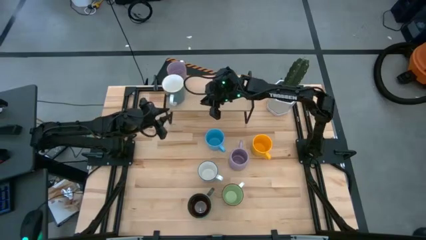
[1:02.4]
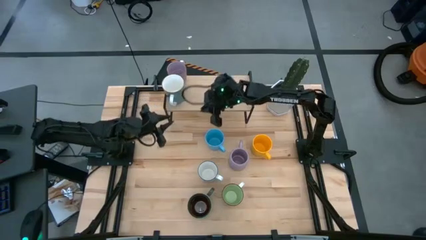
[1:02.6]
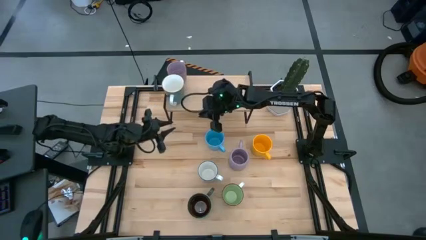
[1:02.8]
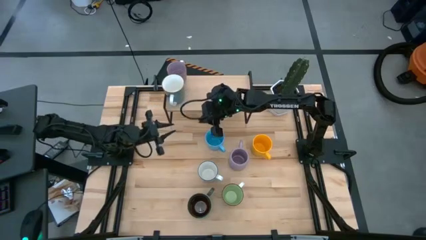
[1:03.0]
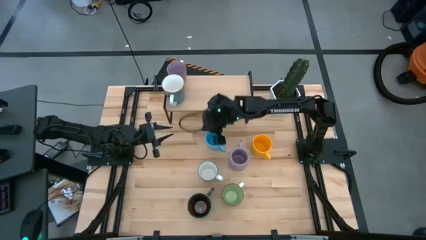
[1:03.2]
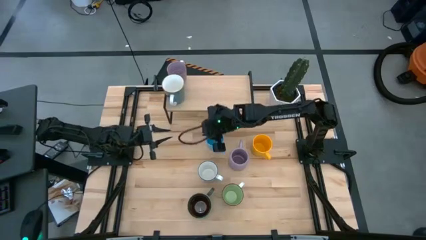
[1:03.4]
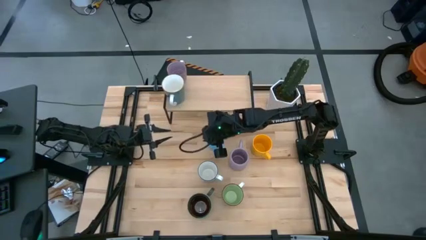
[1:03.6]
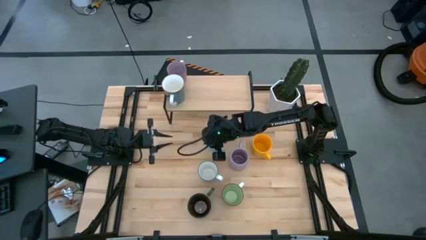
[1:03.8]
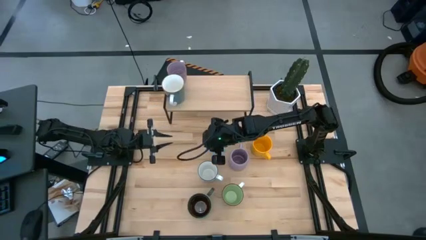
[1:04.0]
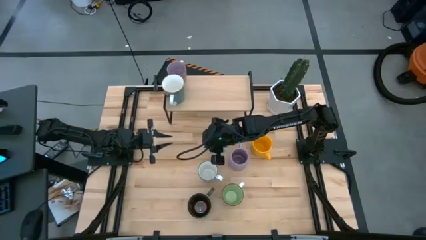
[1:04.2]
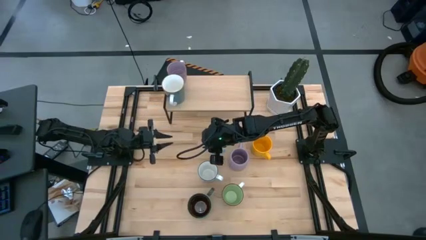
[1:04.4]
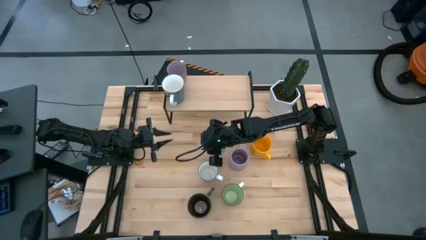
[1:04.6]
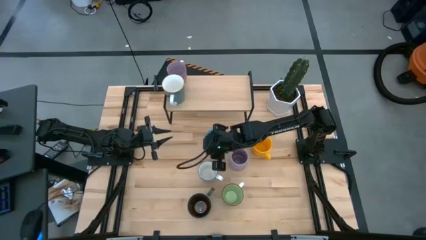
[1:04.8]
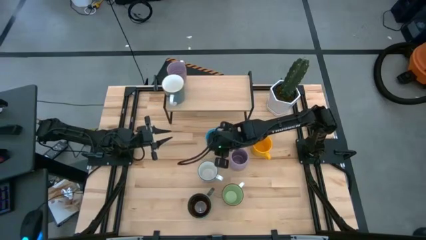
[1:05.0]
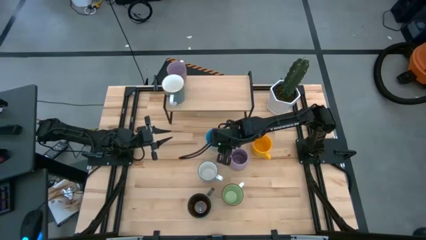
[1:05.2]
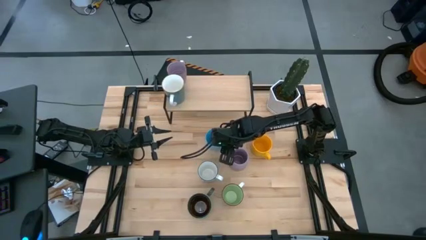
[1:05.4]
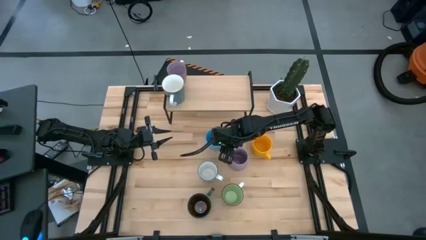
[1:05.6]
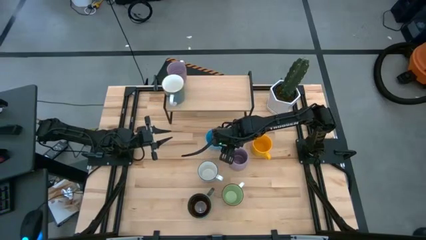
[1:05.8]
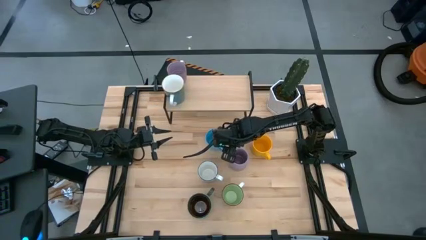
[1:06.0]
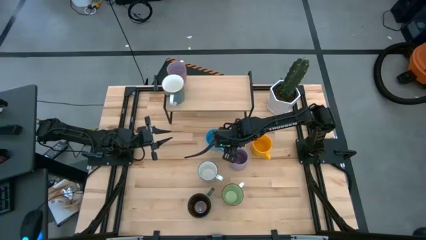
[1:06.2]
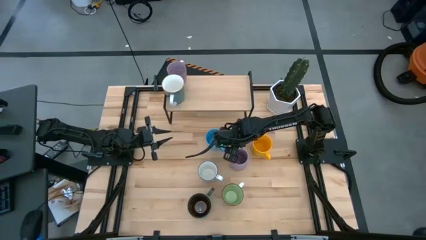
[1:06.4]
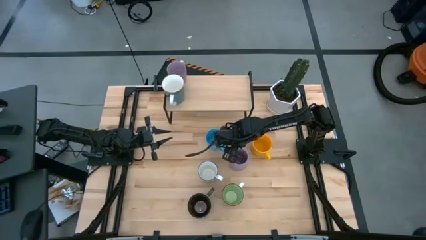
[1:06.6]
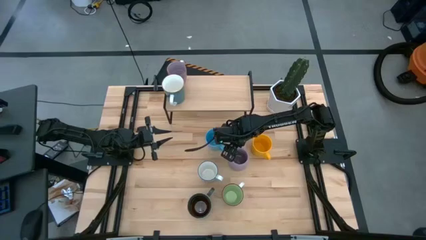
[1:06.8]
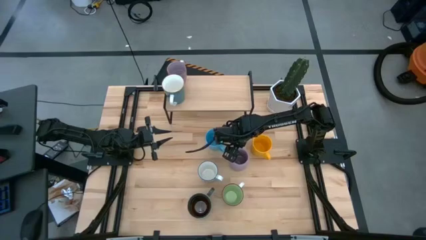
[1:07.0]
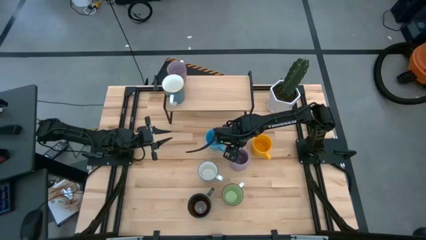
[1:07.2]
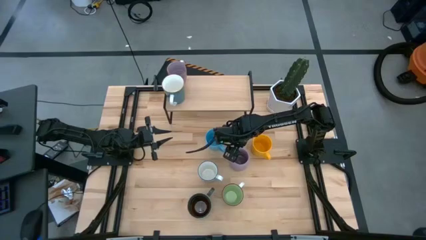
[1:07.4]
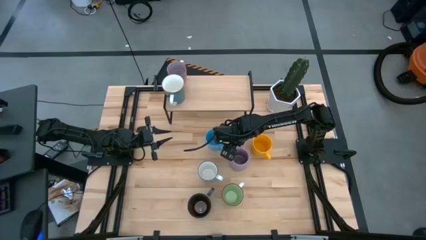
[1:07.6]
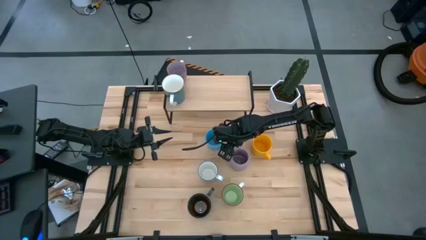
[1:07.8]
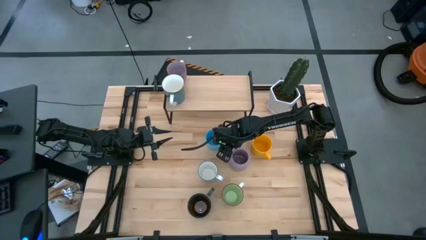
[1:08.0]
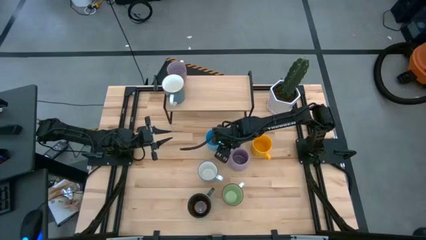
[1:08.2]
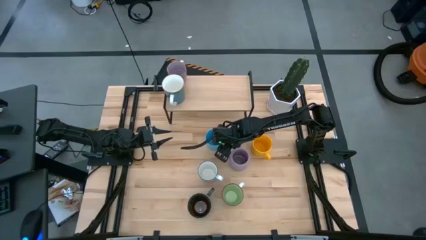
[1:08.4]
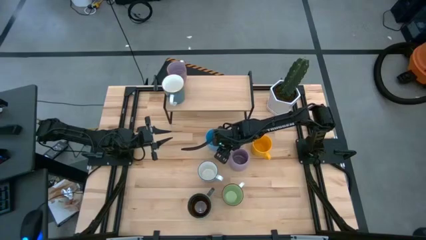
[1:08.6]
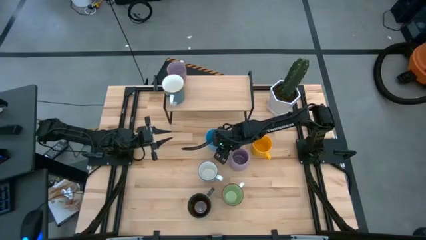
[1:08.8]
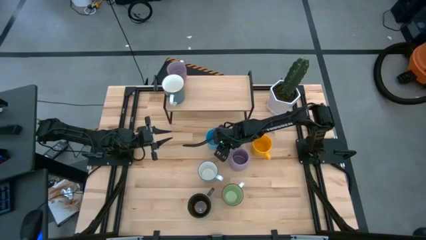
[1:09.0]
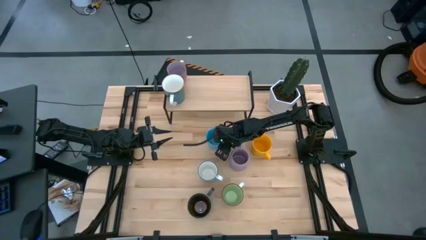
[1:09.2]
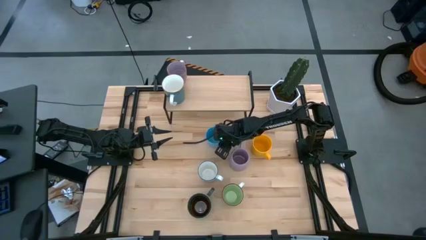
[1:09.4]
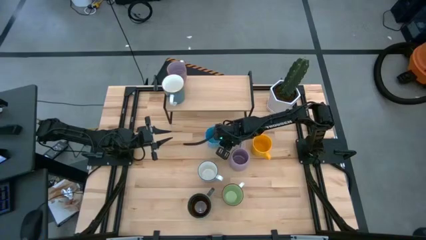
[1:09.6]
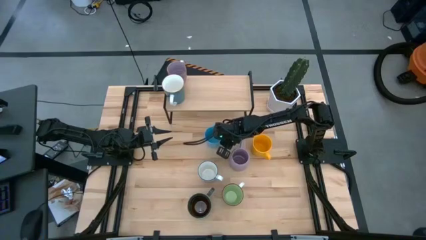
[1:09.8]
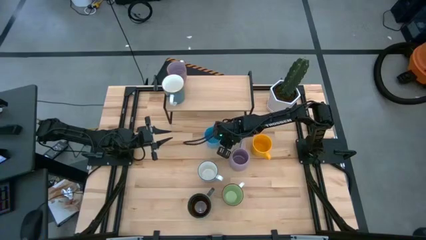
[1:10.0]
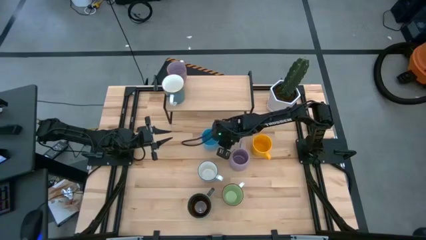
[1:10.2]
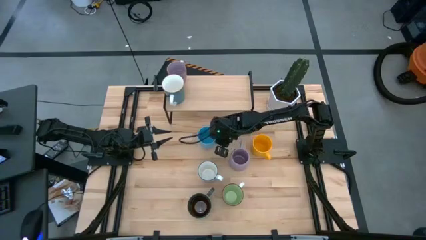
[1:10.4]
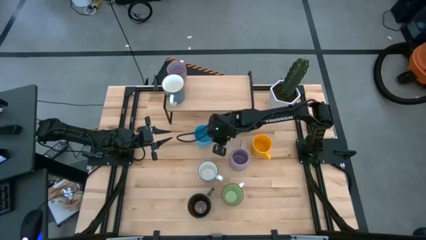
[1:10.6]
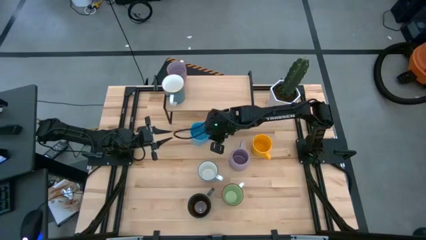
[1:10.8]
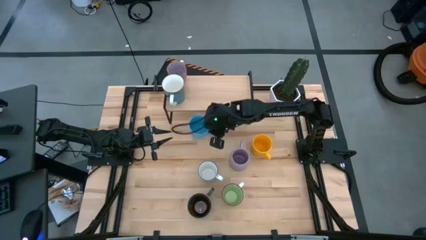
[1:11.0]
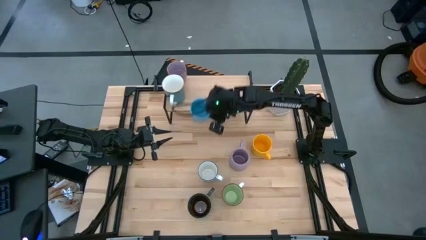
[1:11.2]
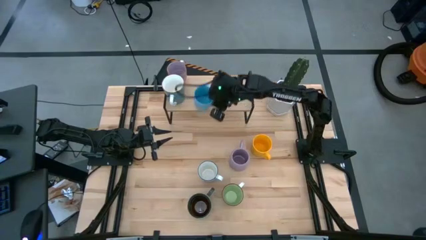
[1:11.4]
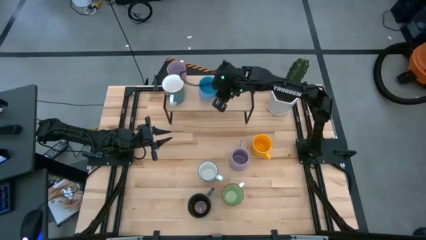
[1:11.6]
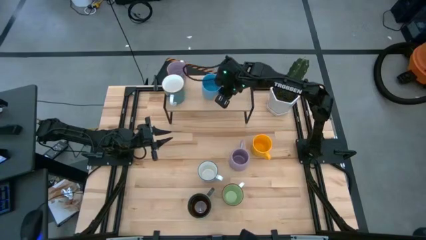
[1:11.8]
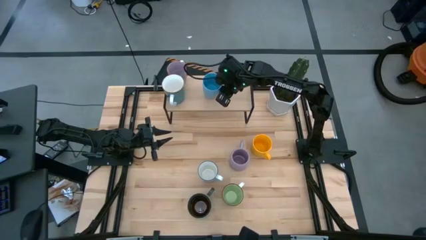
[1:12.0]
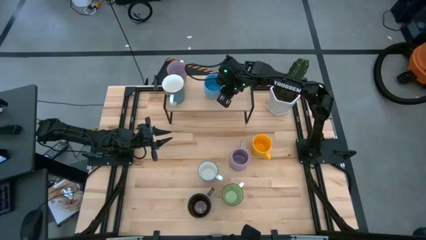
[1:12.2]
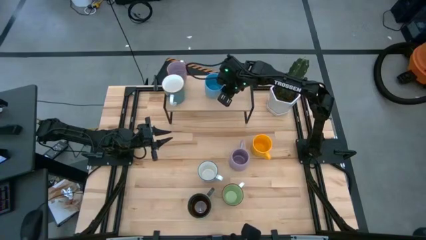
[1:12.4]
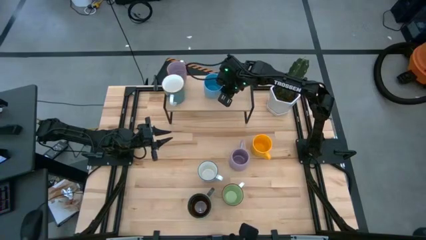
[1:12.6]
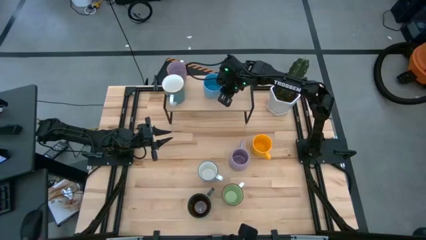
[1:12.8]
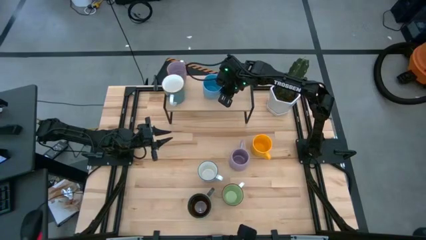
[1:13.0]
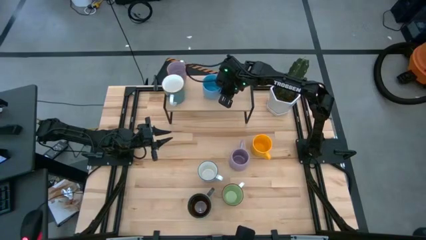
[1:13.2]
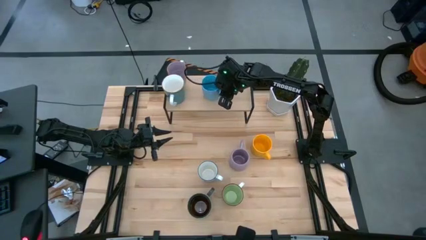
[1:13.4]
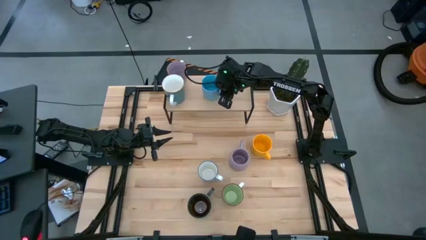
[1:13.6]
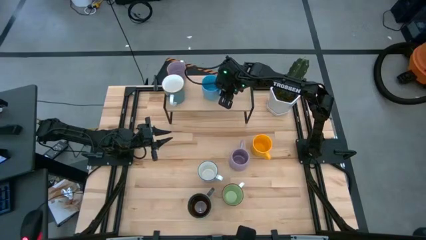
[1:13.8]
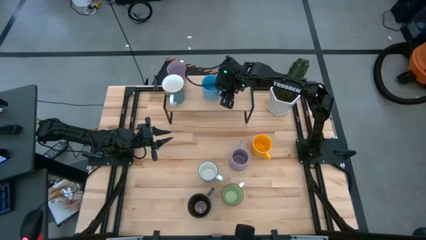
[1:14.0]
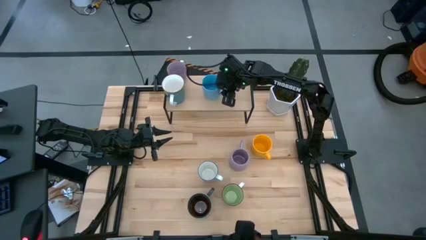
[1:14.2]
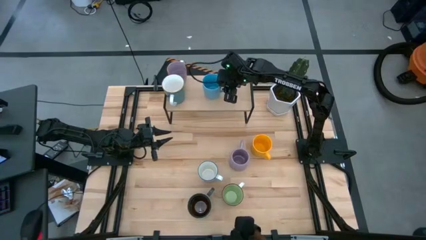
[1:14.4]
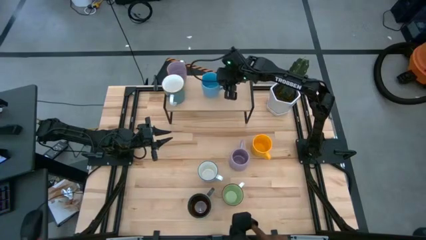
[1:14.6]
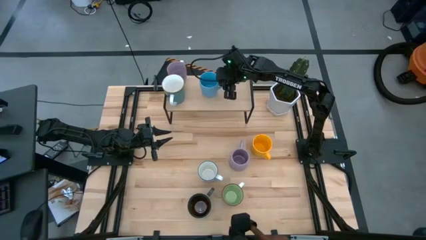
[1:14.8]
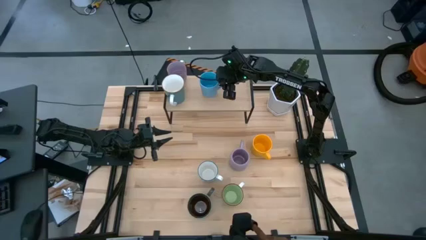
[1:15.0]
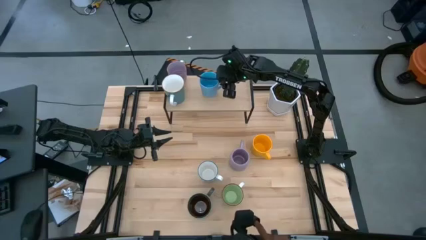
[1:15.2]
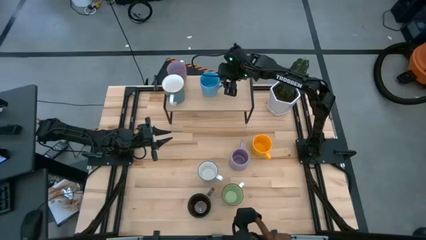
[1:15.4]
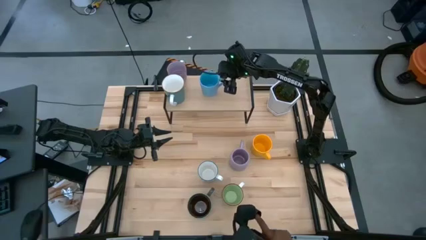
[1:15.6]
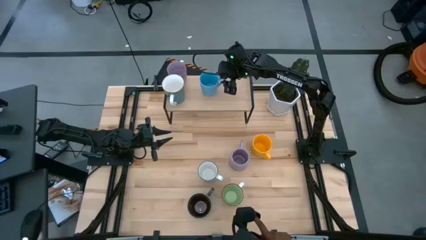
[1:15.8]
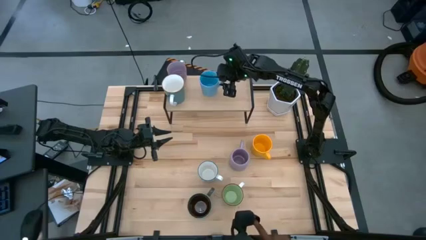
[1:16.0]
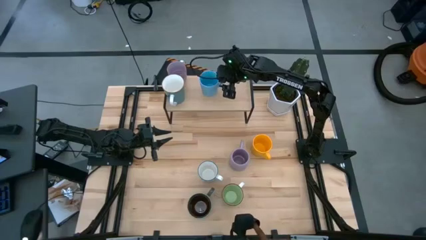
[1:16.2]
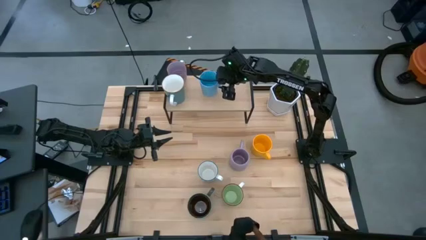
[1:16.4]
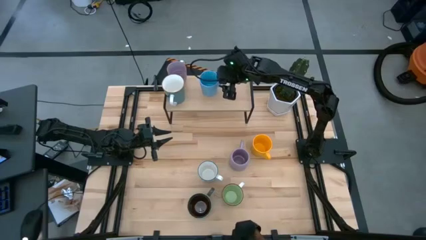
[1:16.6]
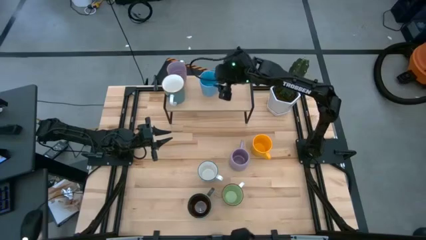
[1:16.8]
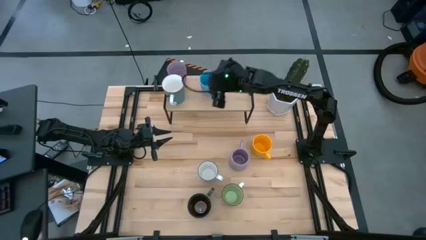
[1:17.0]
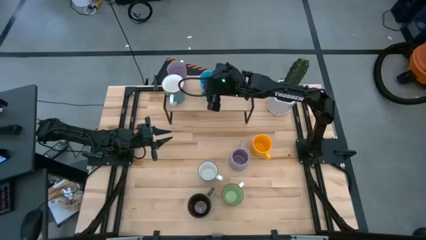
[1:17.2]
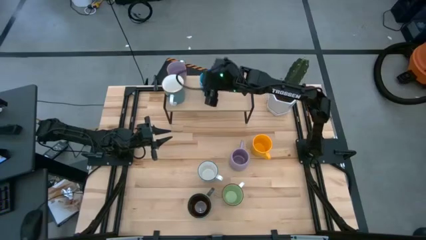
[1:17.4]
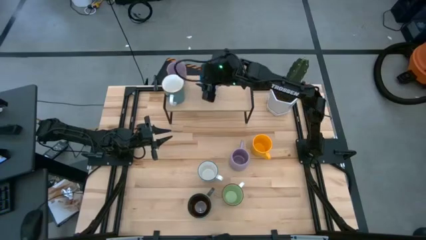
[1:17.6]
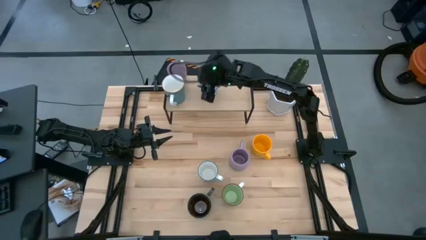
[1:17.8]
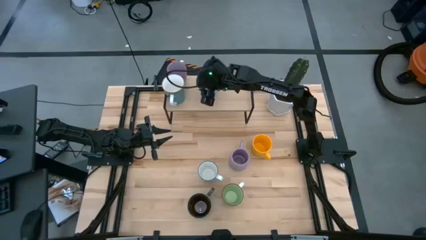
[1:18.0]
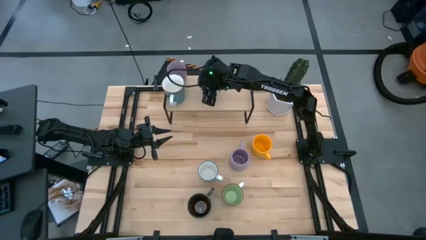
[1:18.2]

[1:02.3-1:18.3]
Task: Place coffee mugs
Put the blue mug on the shelf
